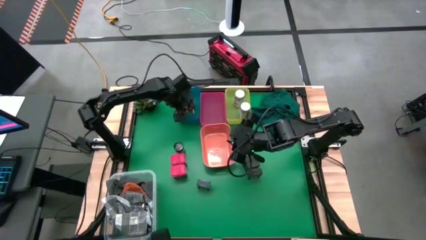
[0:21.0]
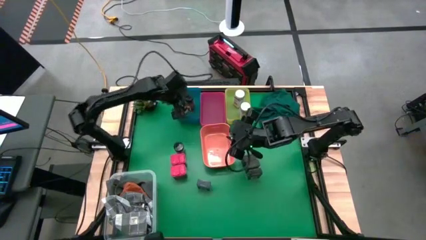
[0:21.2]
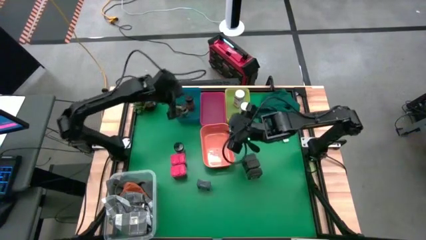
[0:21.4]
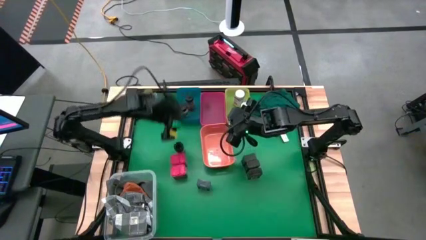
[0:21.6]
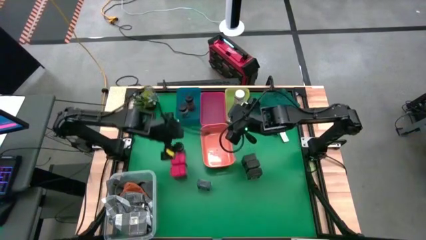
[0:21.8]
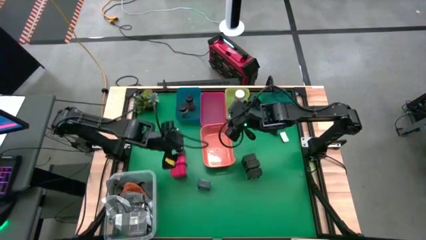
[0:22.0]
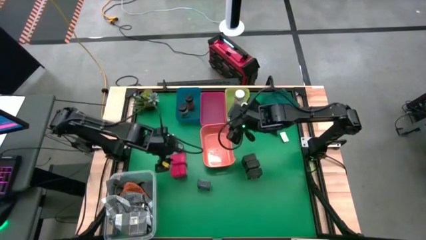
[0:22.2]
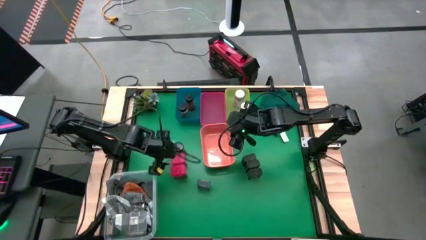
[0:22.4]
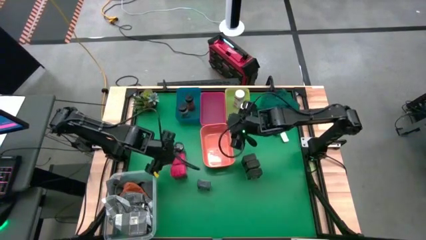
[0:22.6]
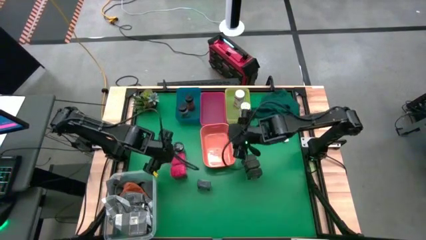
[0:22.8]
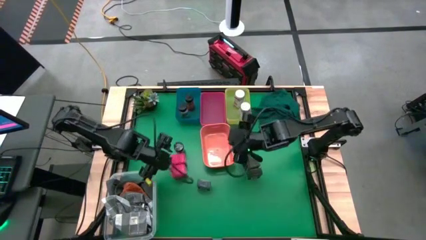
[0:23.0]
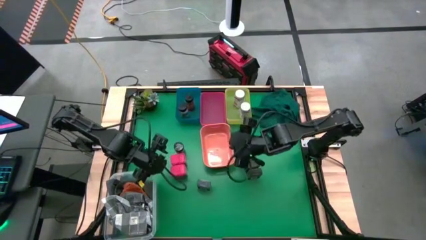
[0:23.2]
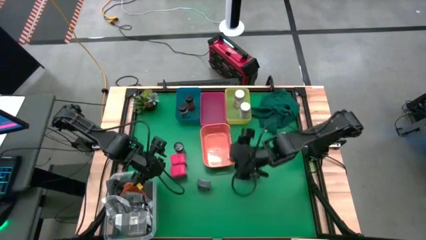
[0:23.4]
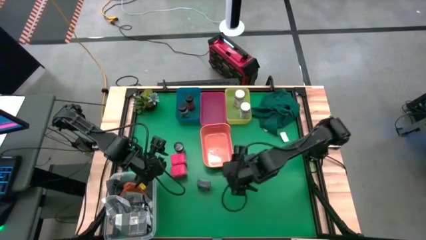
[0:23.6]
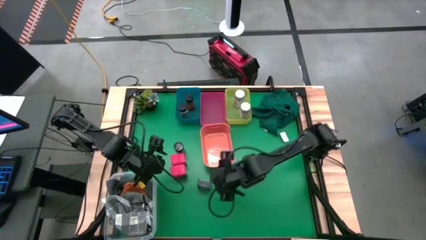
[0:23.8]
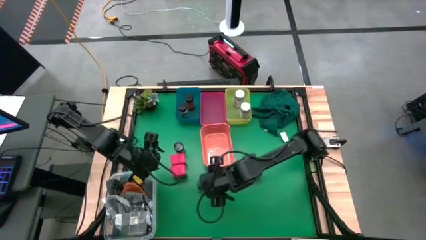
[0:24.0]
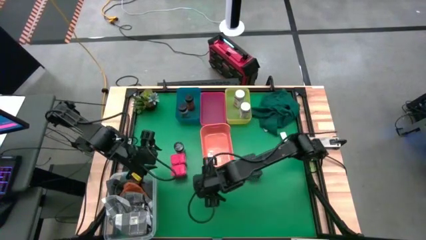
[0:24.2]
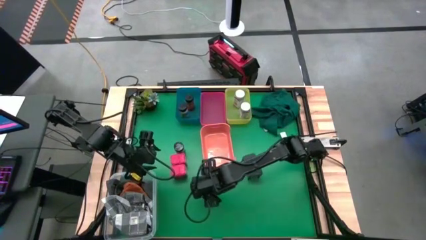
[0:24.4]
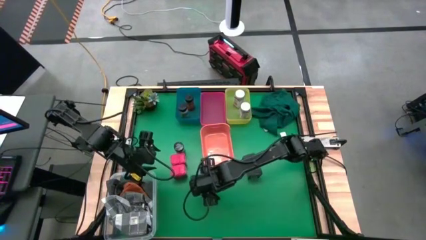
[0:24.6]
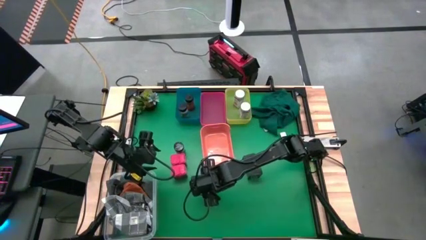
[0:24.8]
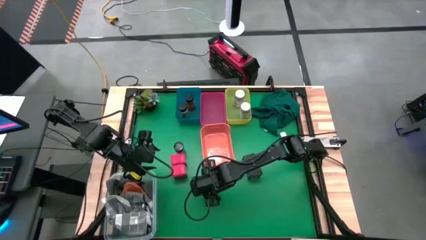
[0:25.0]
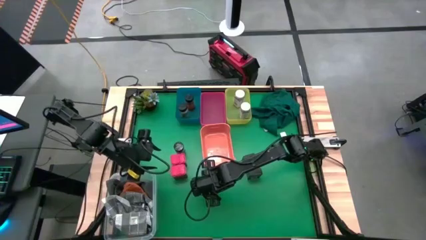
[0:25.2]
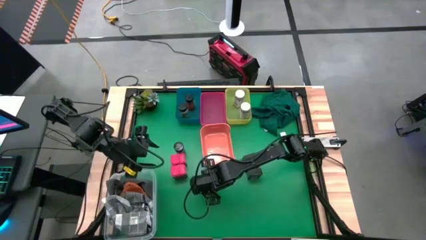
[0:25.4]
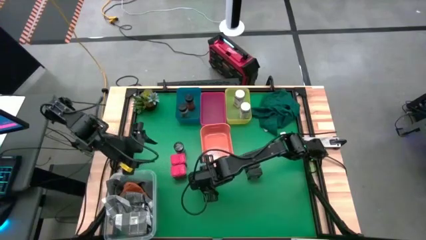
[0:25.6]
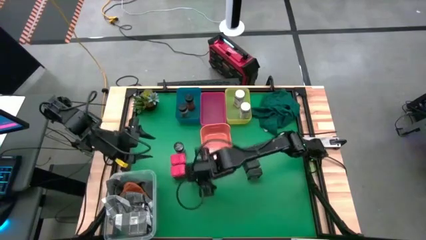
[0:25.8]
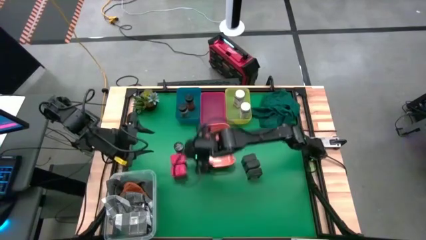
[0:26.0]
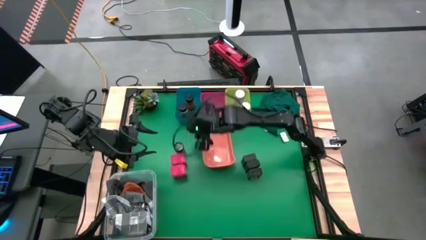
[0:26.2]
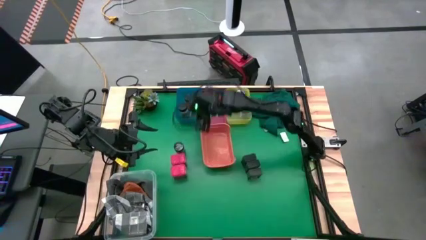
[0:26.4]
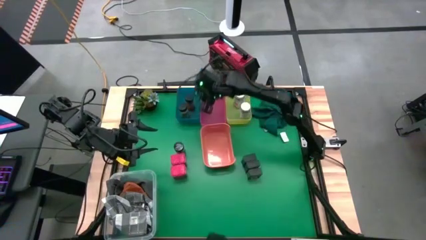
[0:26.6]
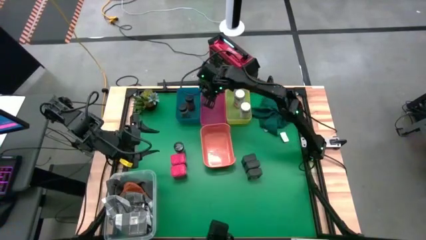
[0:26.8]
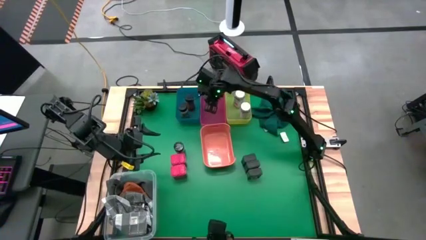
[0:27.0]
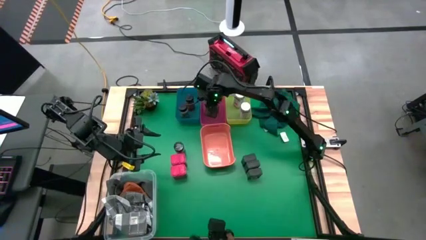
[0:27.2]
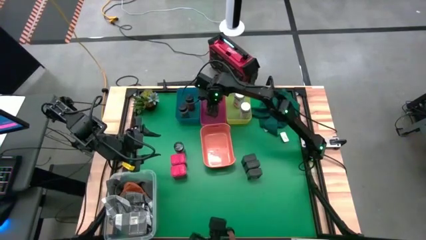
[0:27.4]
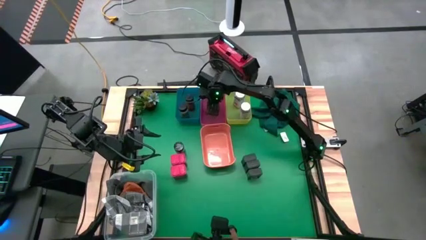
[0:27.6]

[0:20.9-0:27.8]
Task: Sort spices by type
Put the bottom black seasoning can into the pink bin

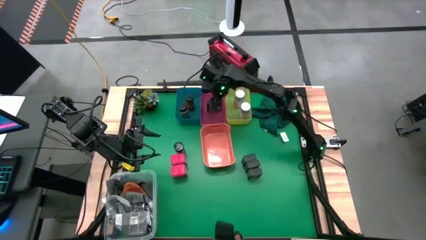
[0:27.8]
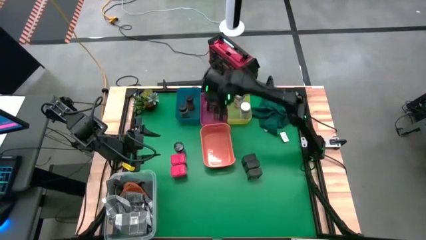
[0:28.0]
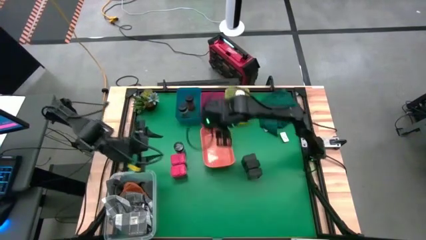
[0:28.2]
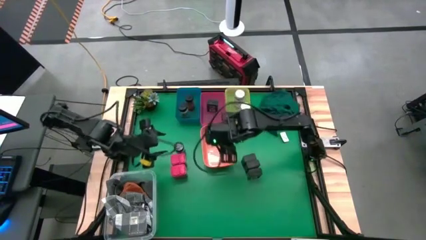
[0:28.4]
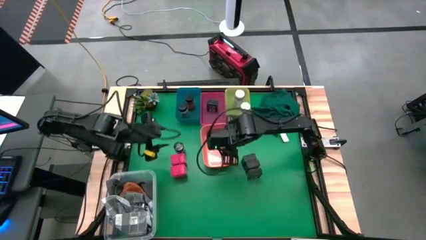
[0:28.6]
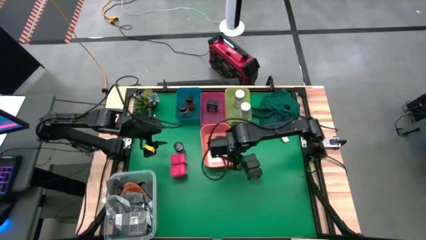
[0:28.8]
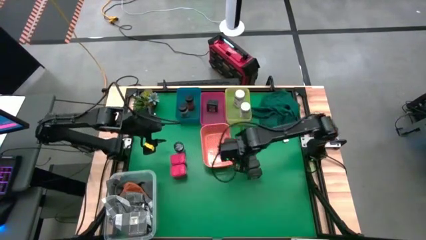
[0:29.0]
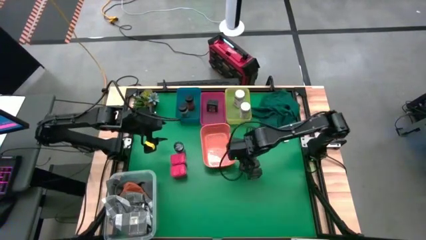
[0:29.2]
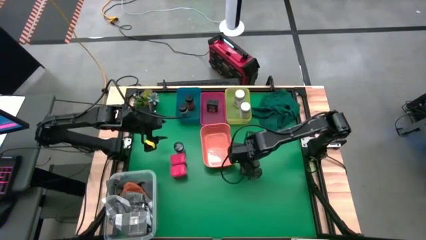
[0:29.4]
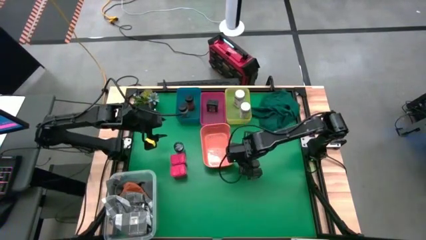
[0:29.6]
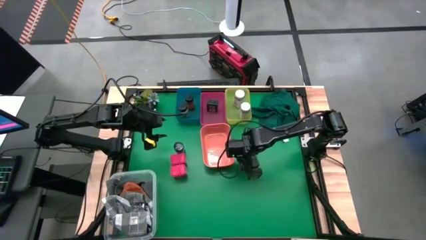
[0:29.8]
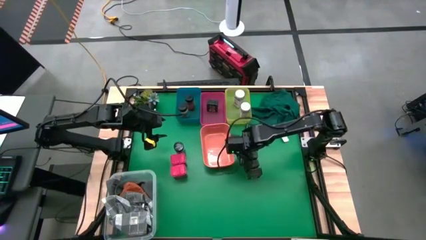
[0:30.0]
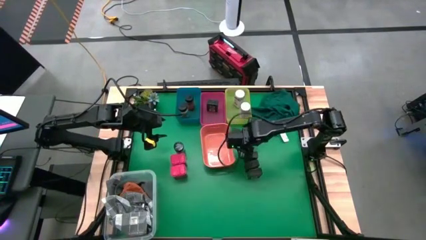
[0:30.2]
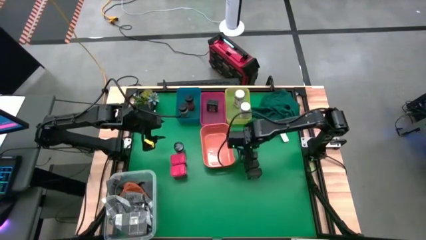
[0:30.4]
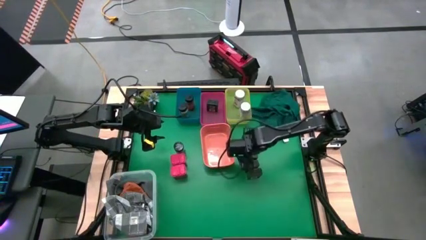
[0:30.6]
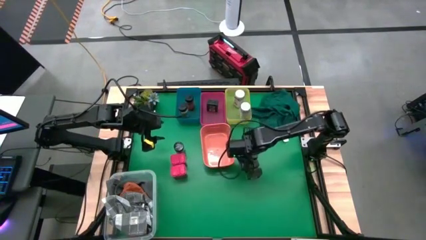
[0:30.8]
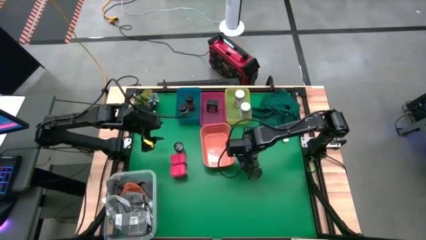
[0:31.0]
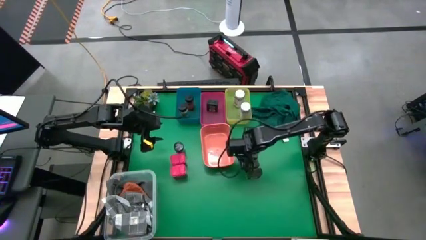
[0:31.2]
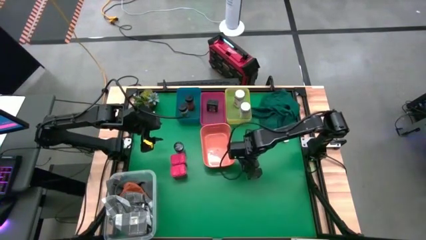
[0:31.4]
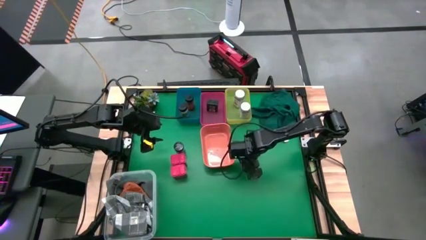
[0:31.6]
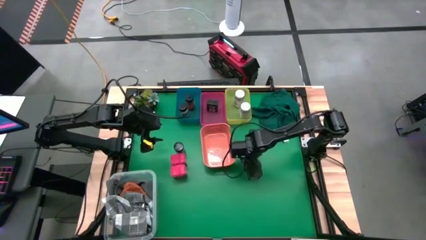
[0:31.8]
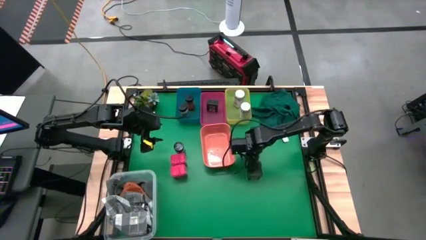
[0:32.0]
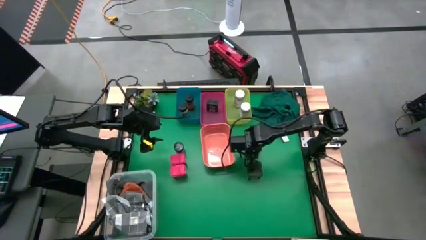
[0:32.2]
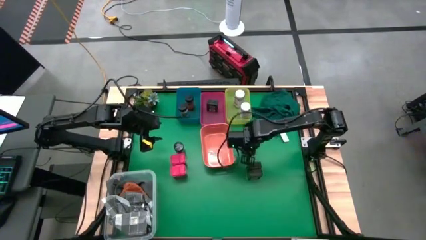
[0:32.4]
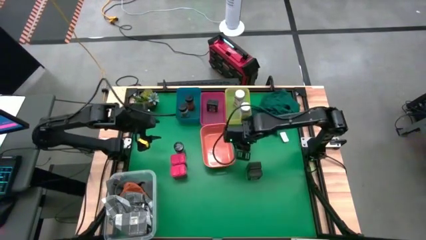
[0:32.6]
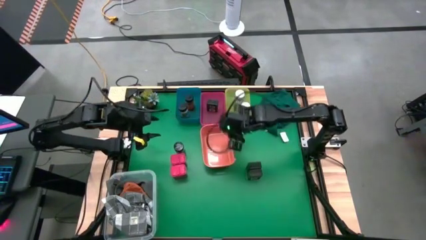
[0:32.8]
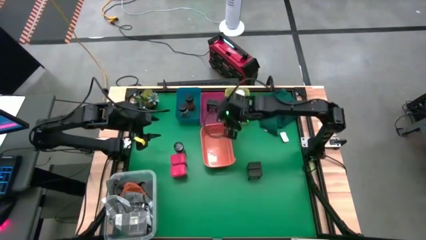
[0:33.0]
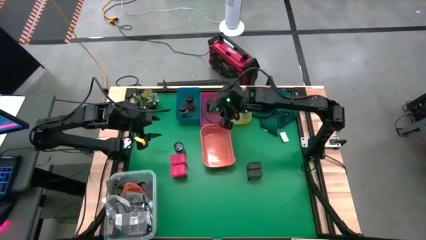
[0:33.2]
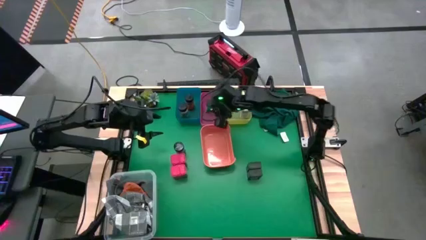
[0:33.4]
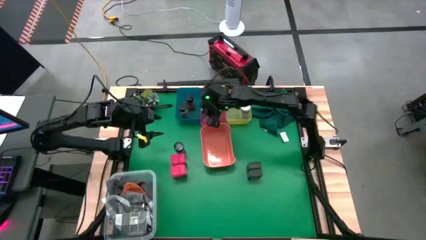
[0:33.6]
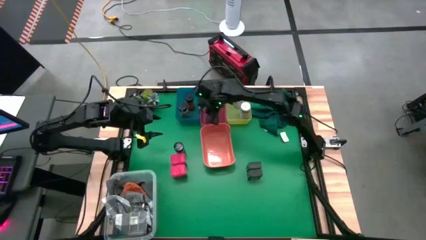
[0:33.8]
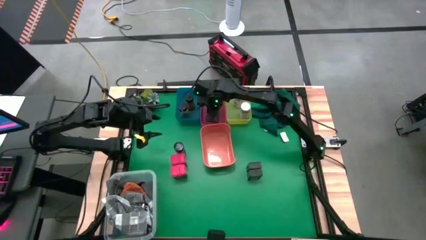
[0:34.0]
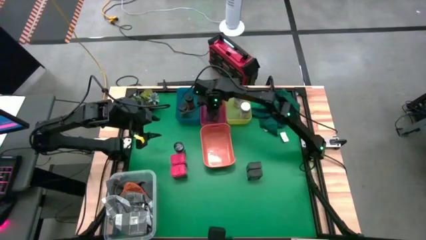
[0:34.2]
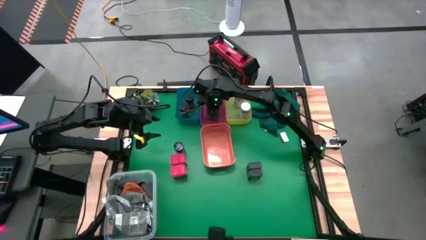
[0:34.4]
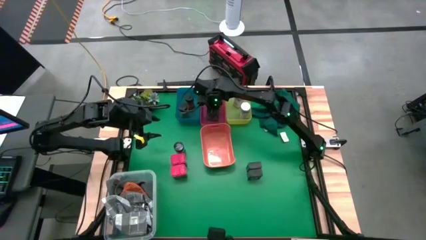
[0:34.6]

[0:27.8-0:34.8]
Put the top black seasoning can into the pink bin

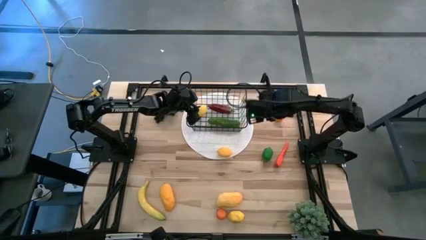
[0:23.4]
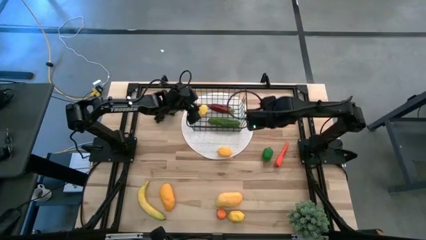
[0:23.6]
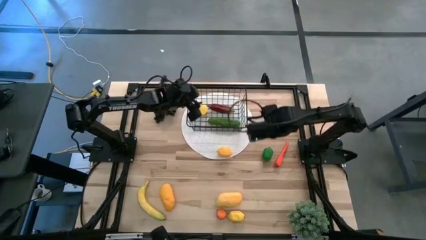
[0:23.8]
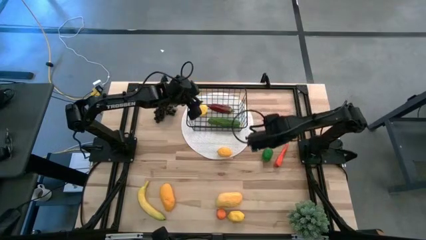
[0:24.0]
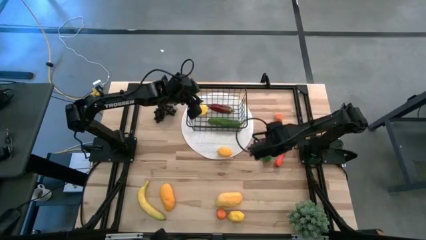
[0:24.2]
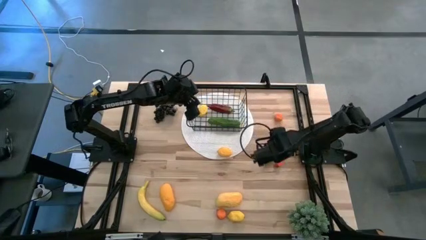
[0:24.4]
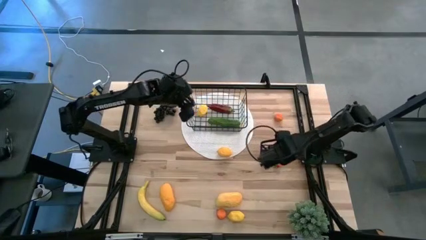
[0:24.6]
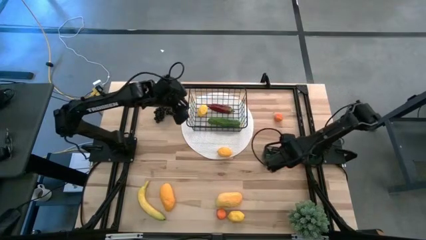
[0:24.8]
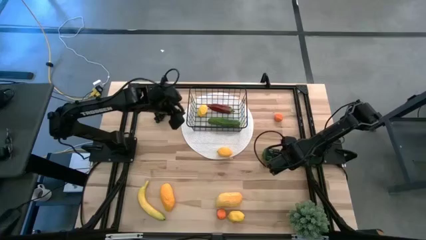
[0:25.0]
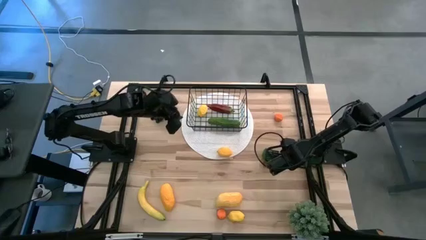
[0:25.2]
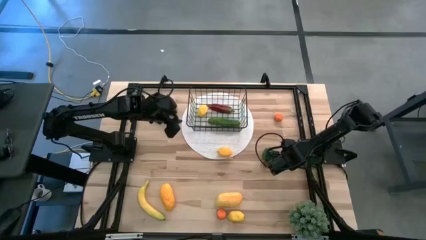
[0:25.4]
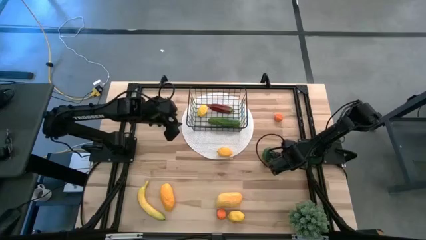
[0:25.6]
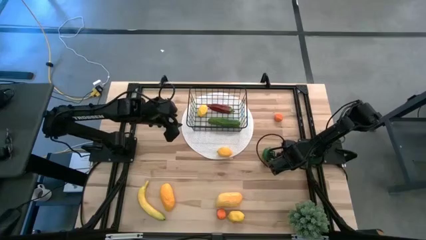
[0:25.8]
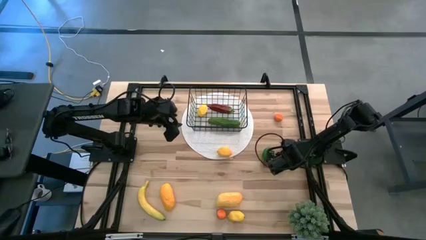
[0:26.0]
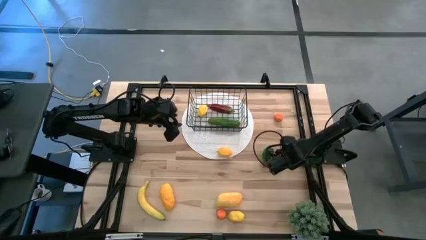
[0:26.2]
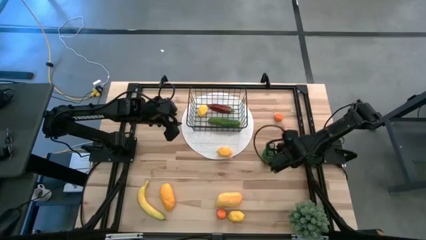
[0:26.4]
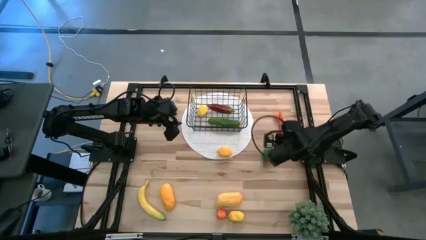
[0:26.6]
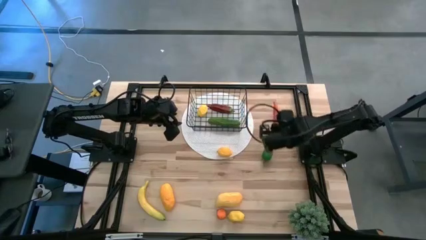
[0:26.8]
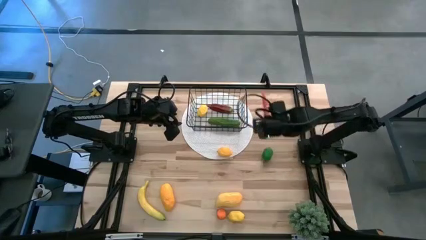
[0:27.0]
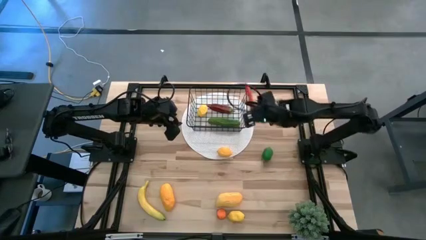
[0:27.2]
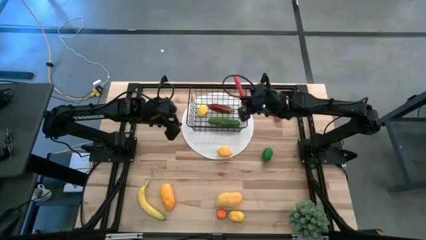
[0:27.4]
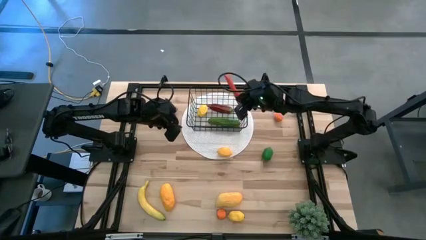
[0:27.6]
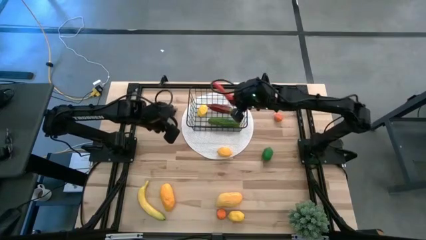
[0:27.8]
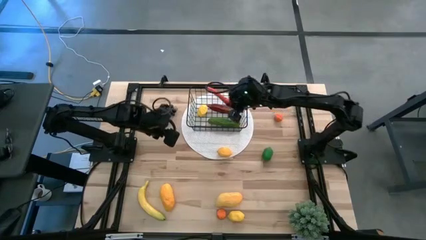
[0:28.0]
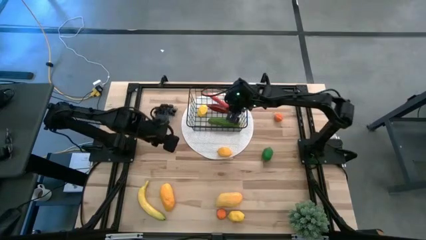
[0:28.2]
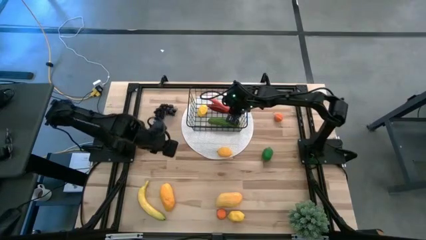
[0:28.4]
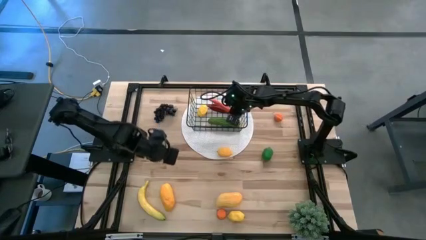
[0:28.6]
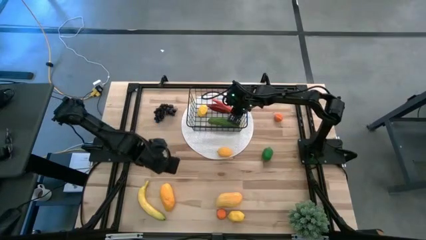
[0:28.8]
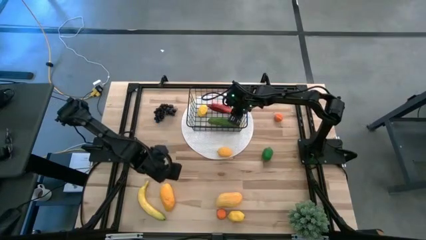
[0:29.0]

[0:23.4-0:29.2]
Task: Build produce basket
Put the orange carrot into the black wire basket
